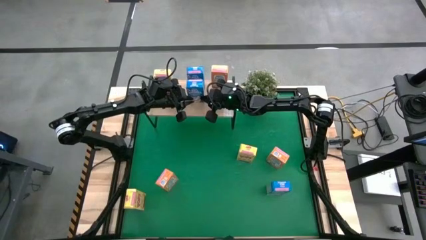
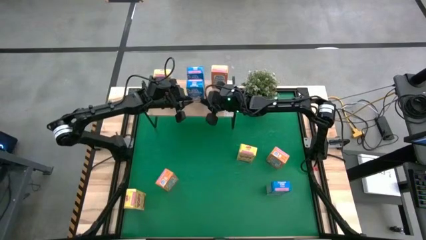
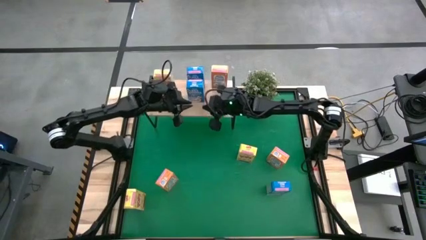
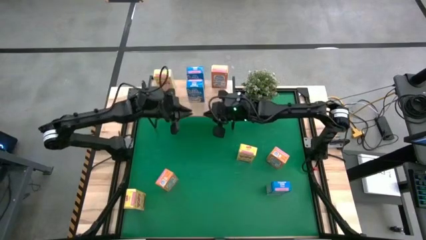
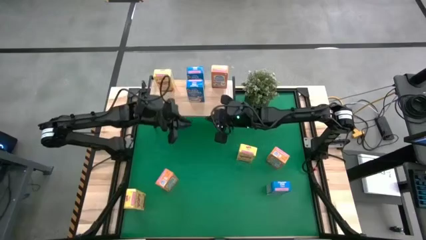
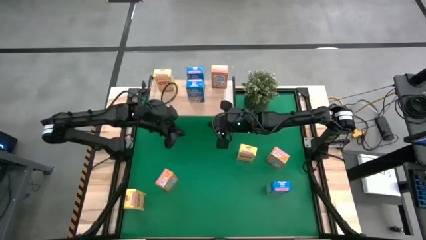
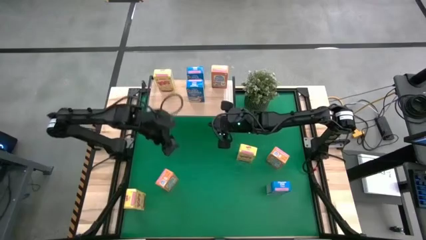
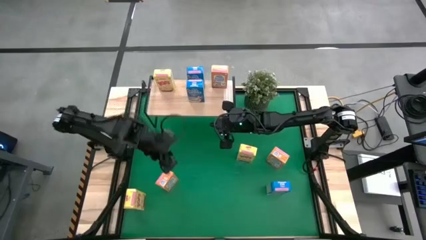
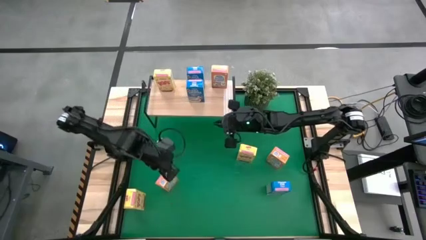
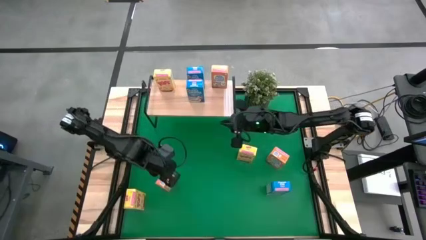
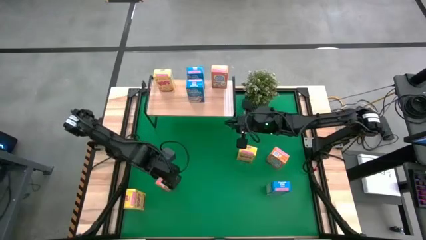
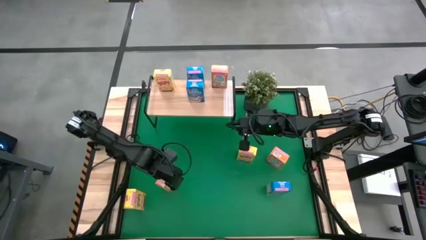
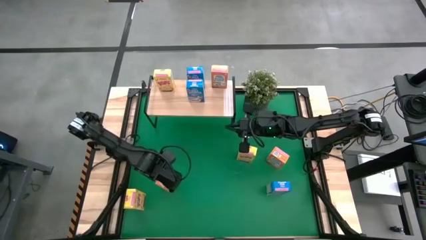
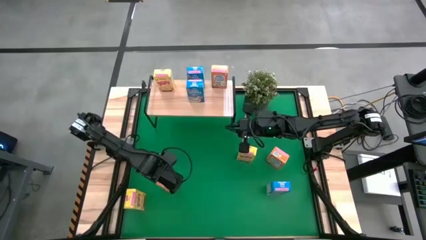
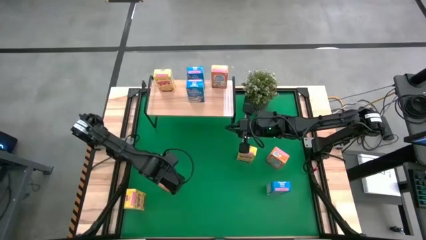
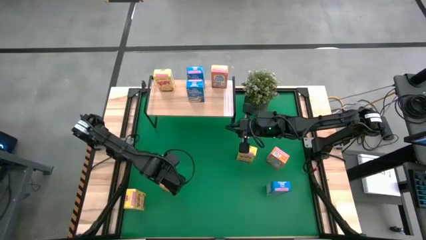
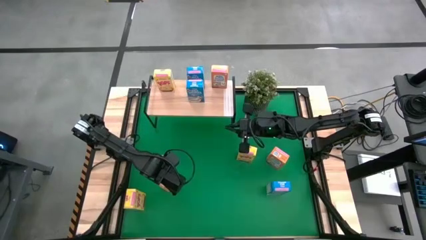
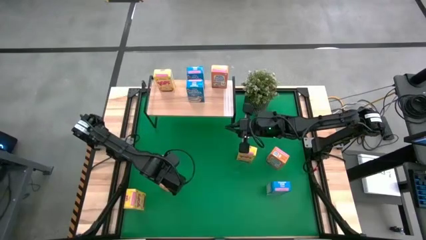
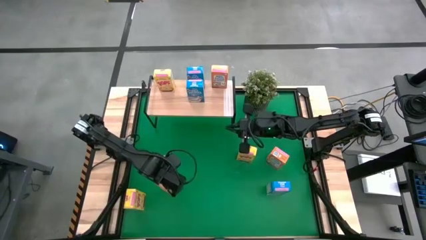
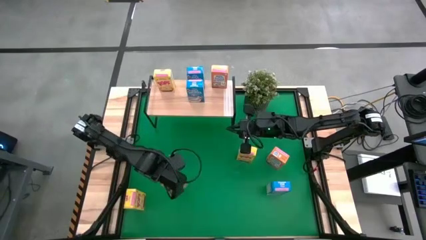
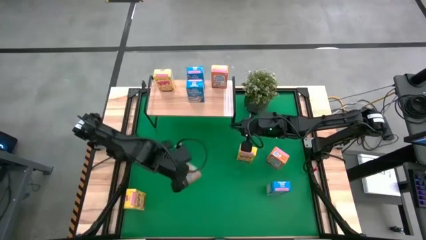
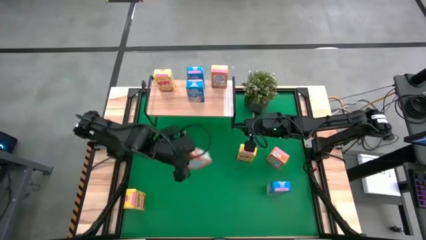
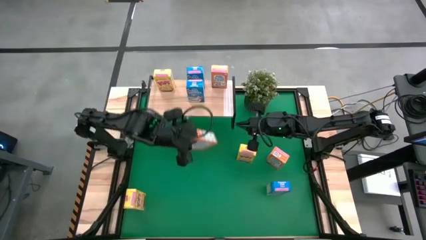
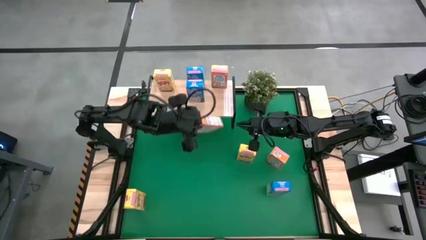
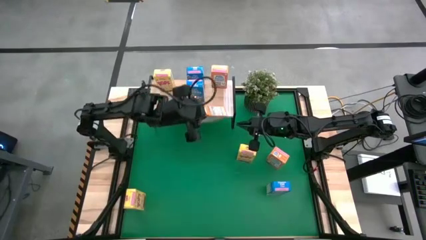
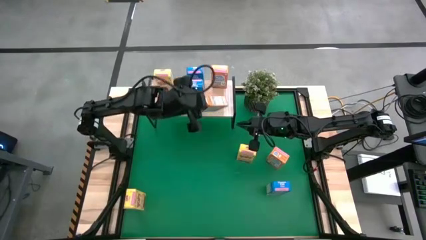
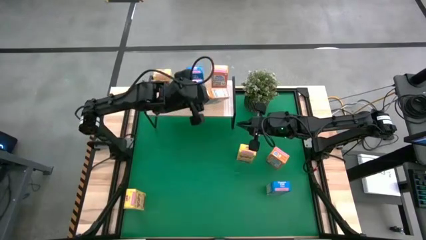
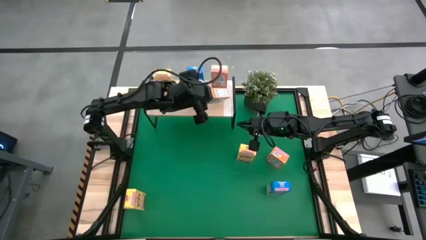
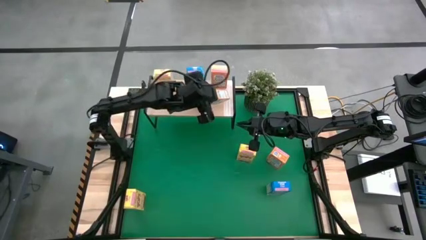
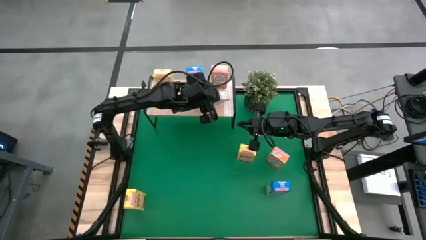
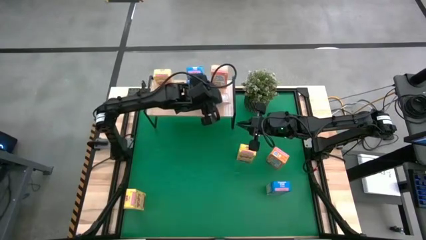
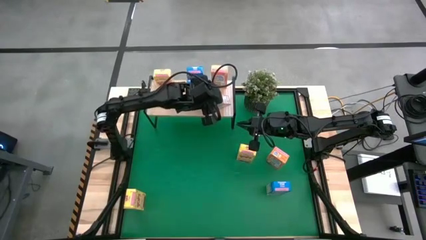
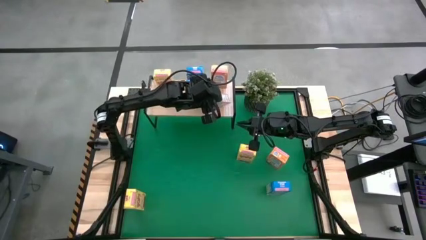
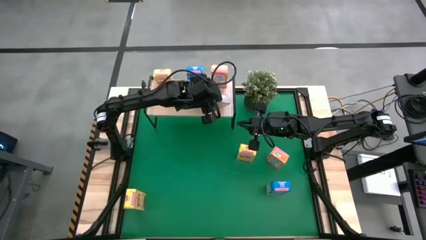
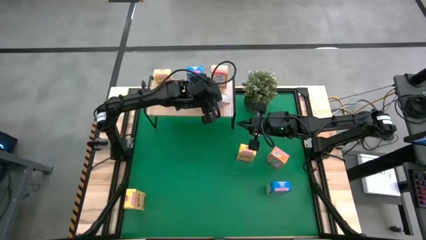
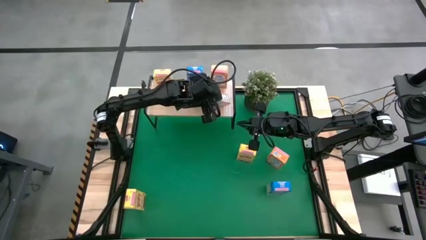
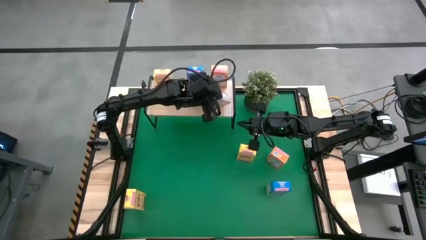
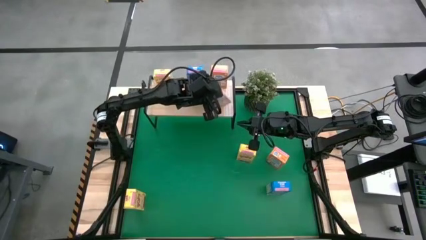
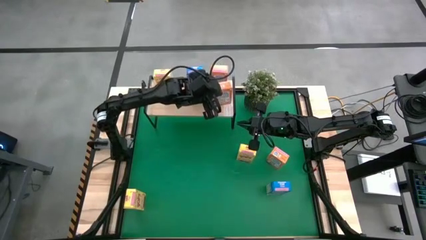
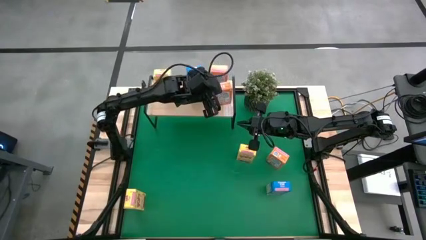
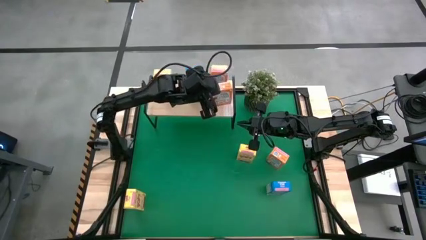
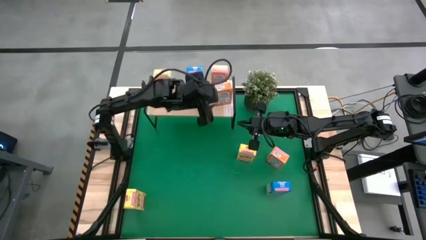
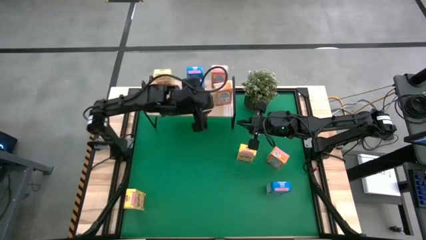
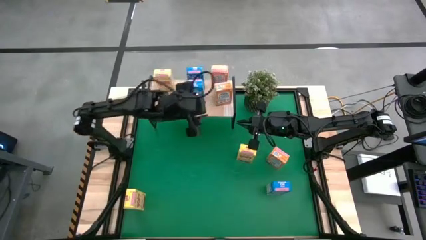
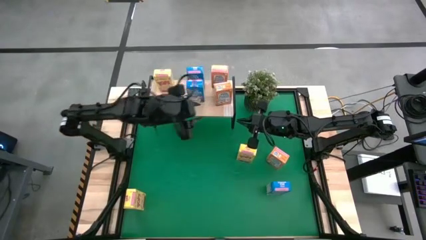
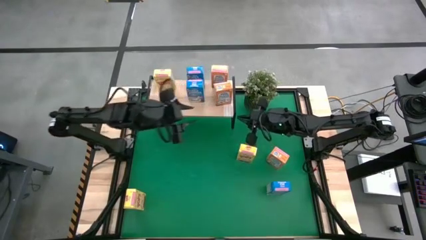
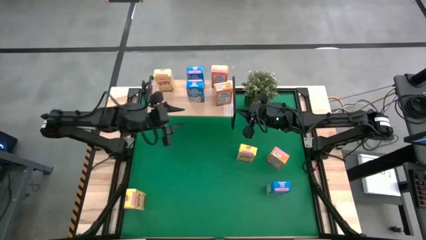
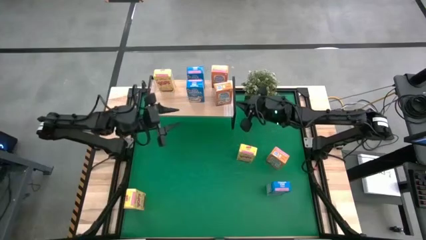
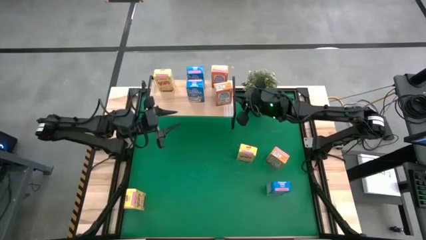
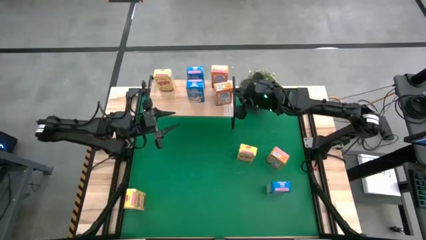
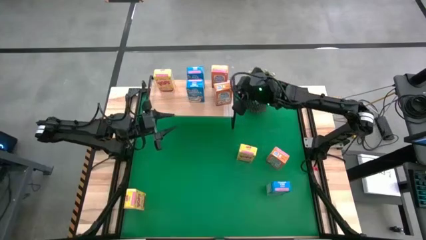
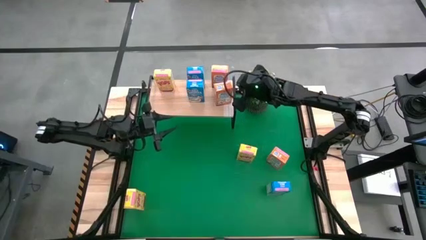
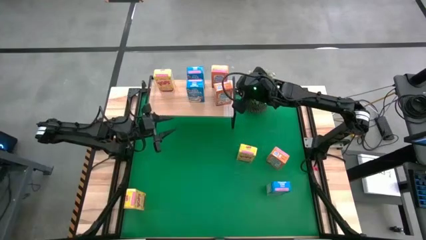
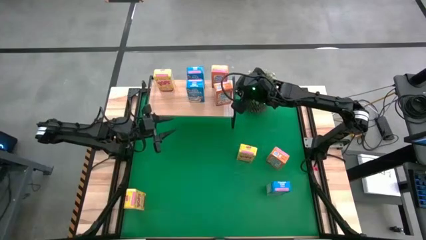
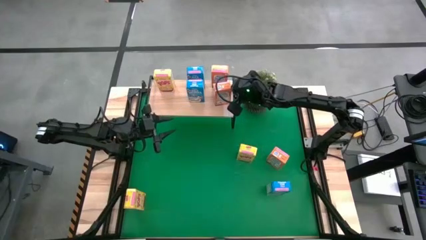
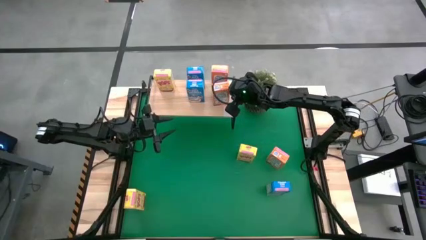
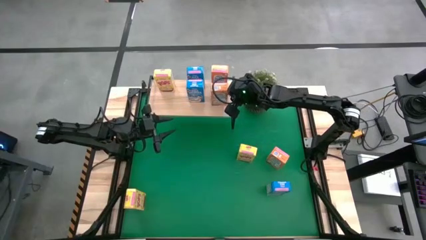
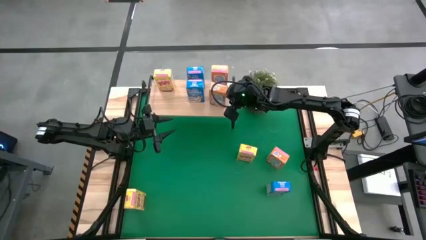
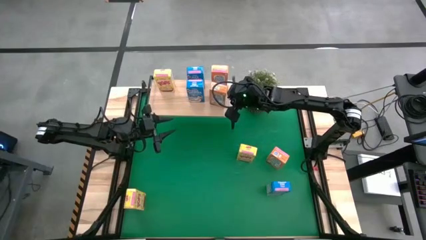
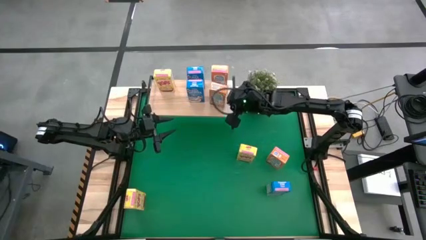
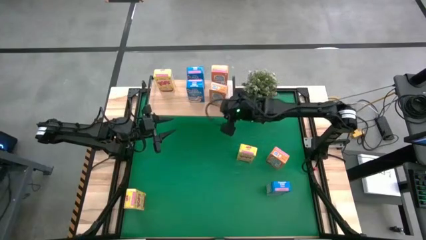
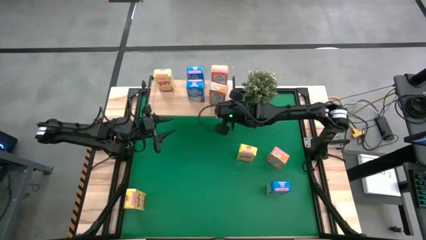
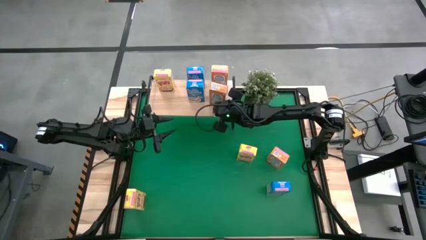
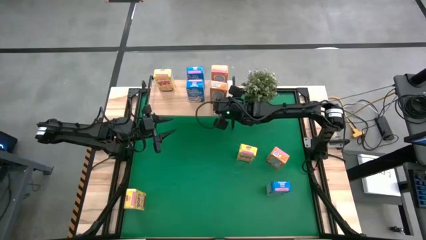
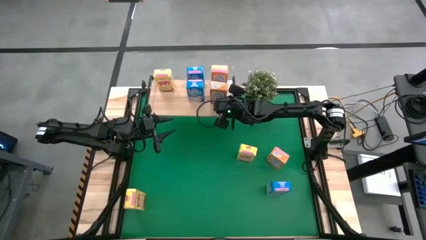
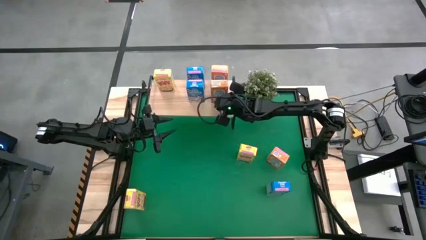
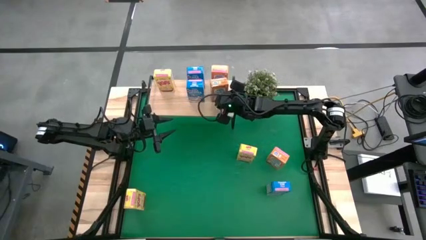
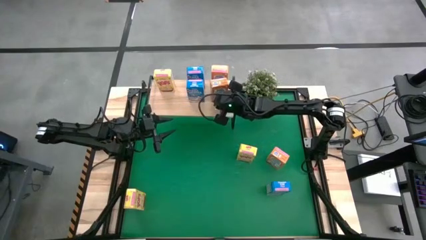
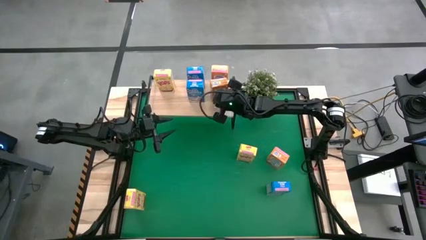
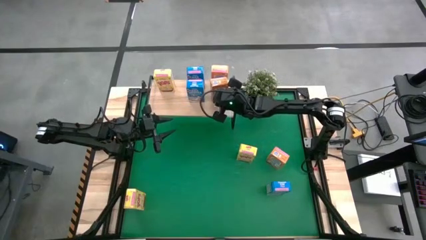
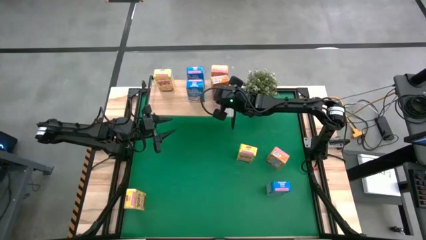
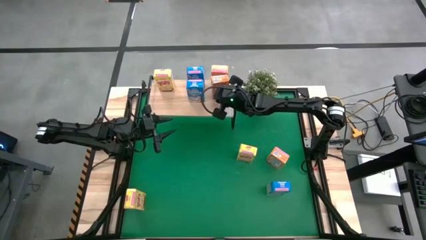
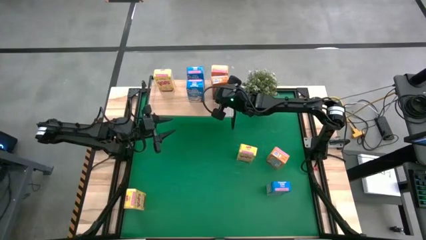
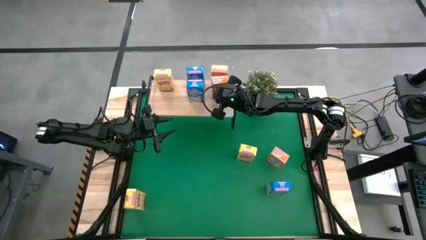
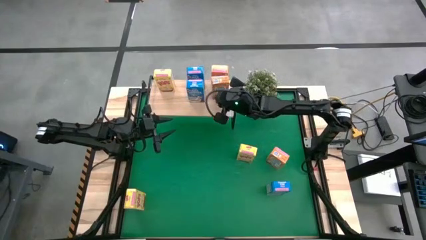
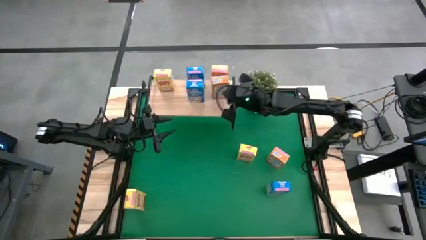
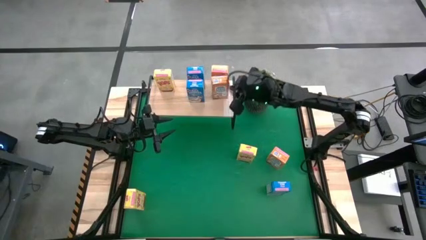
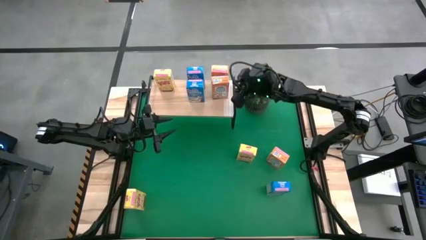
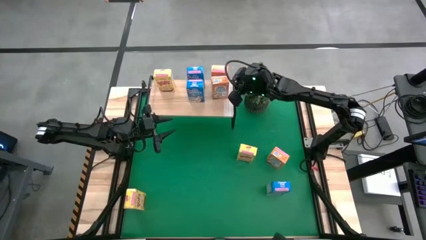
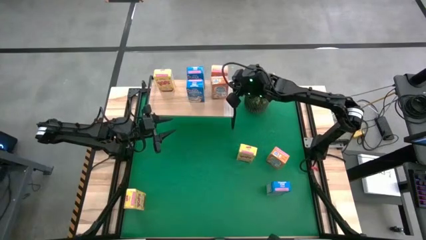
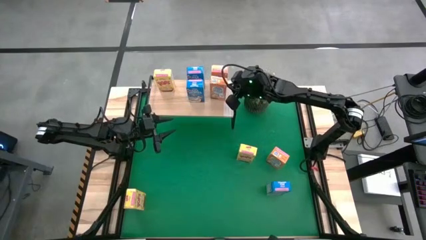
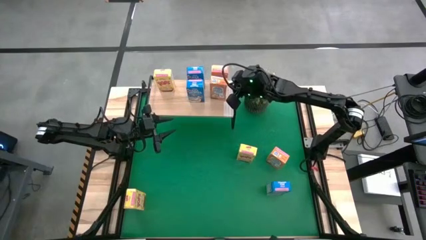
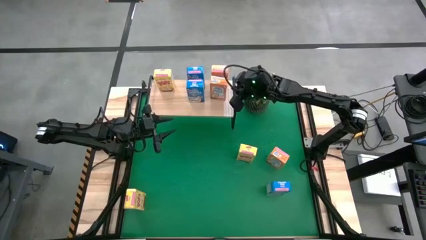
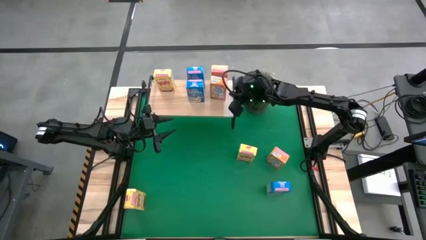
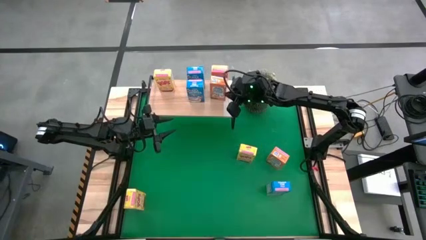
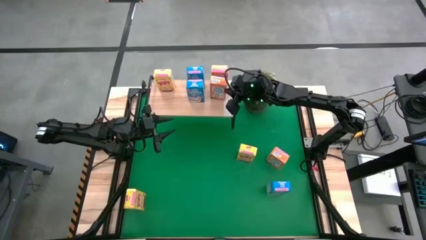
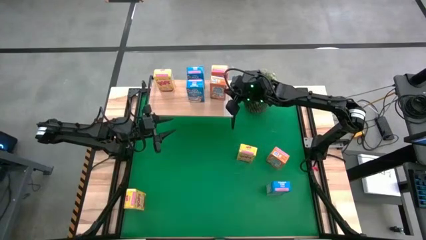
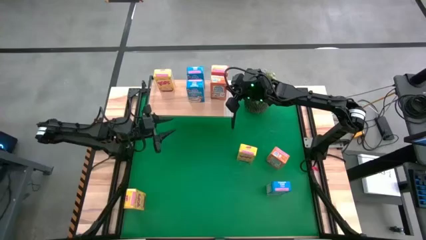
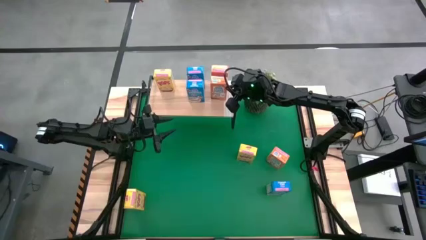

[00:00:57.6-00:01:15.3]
Task: Stack cereal on shelf
Put the left orange cereal box on the shelf
